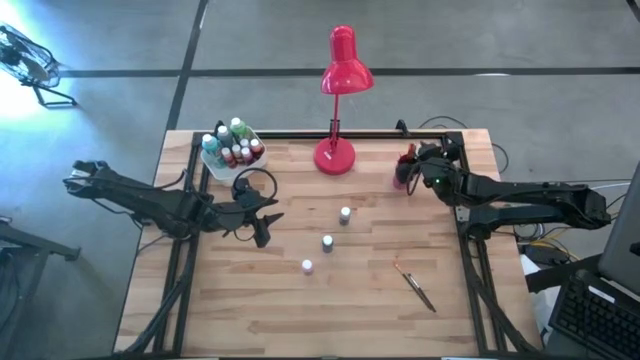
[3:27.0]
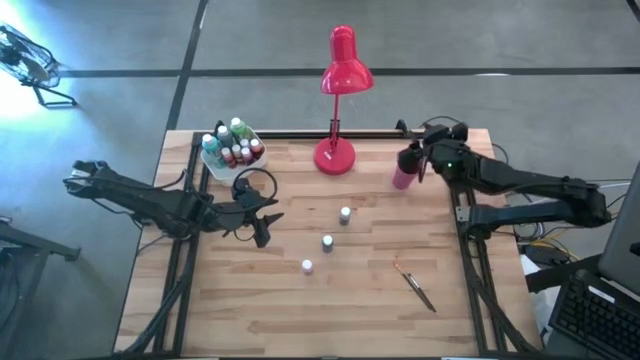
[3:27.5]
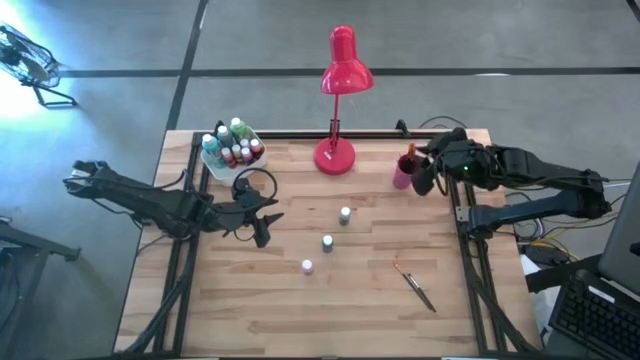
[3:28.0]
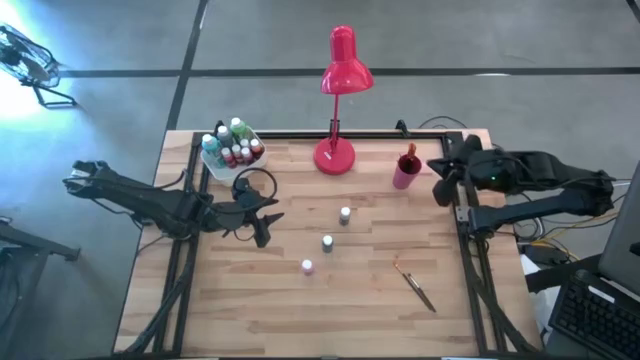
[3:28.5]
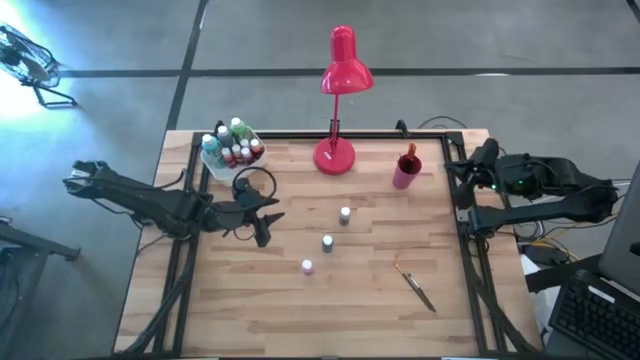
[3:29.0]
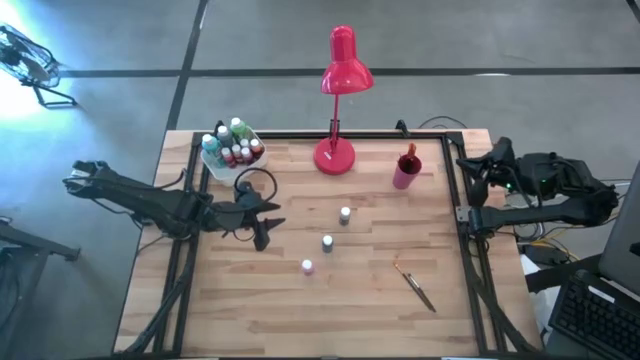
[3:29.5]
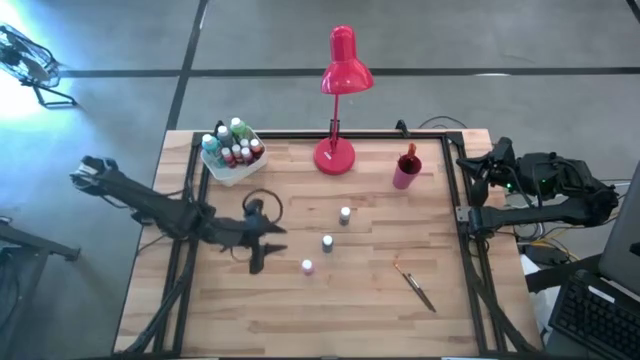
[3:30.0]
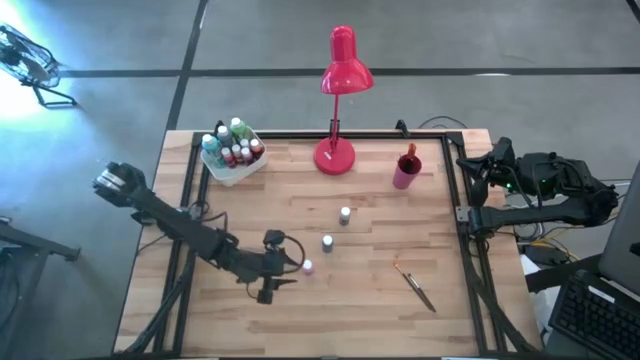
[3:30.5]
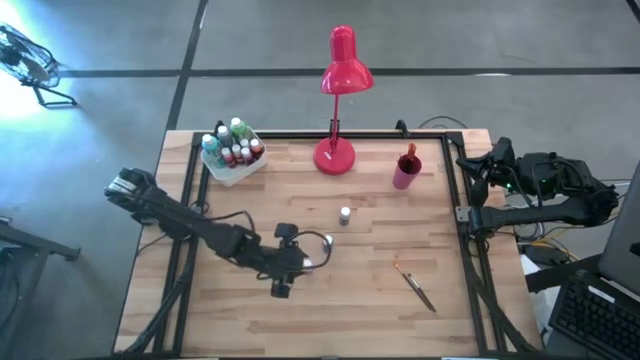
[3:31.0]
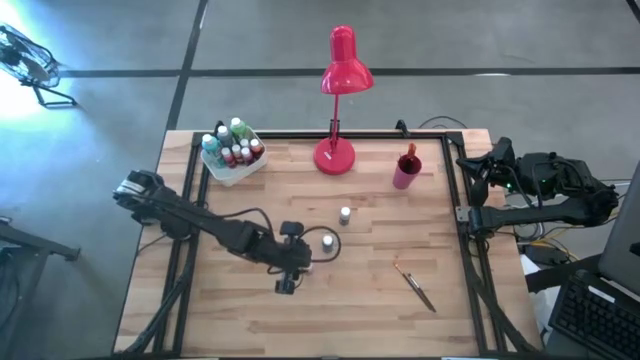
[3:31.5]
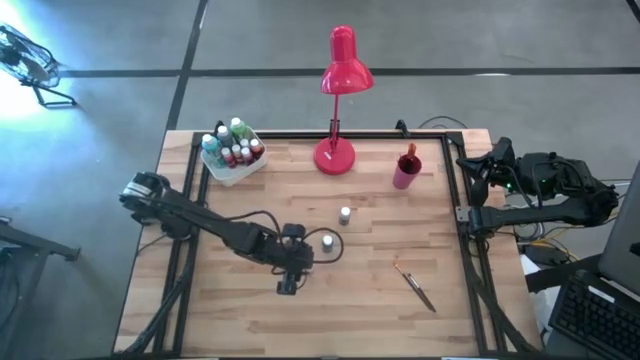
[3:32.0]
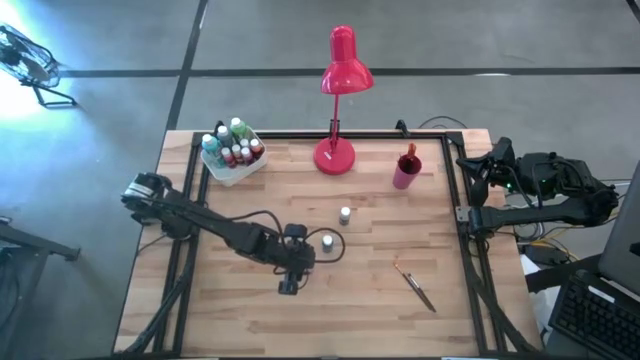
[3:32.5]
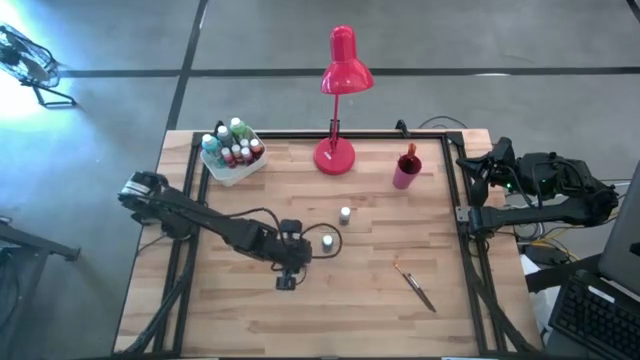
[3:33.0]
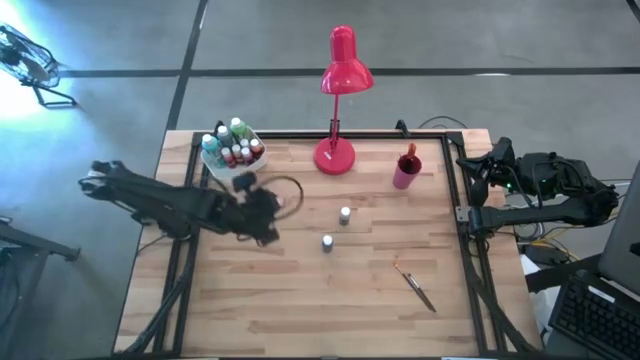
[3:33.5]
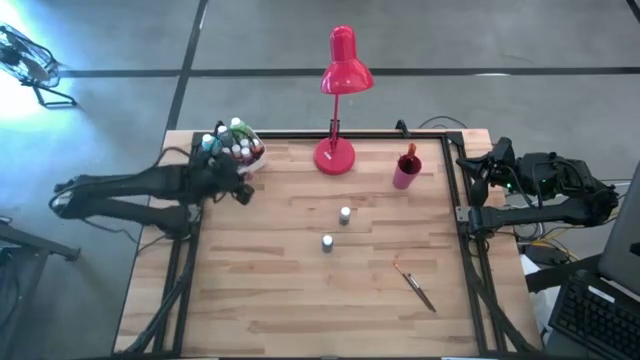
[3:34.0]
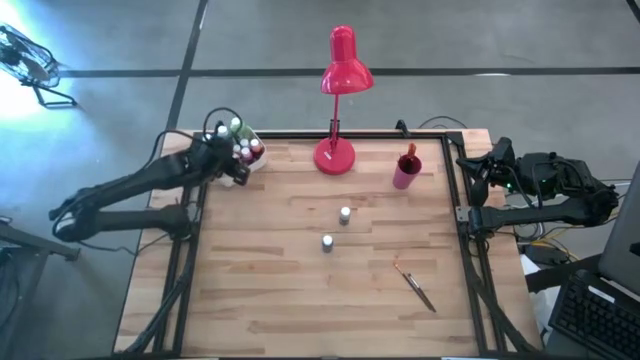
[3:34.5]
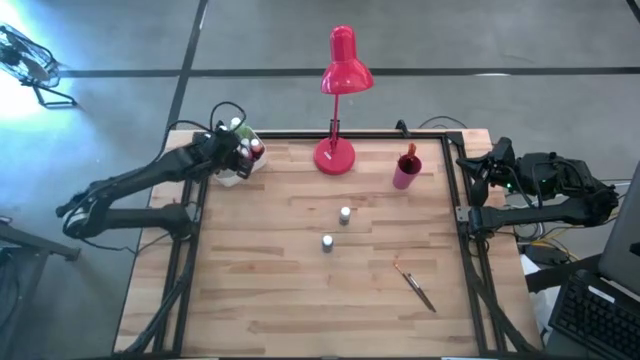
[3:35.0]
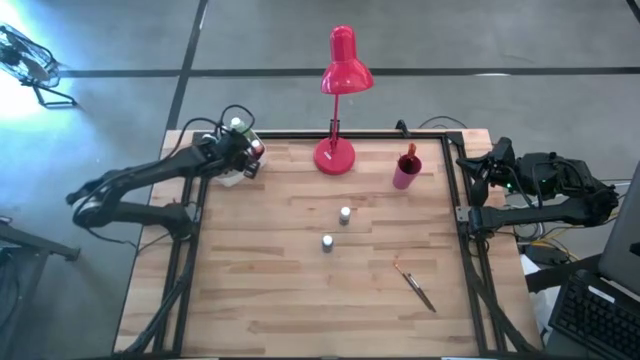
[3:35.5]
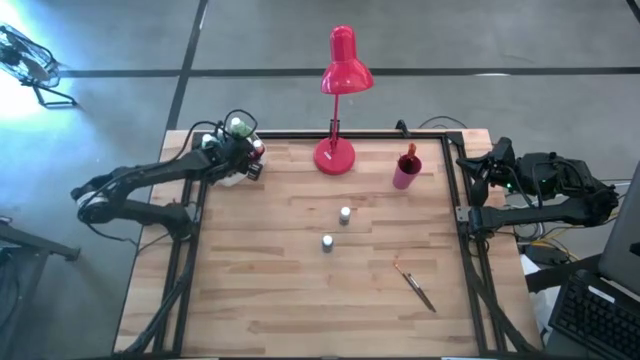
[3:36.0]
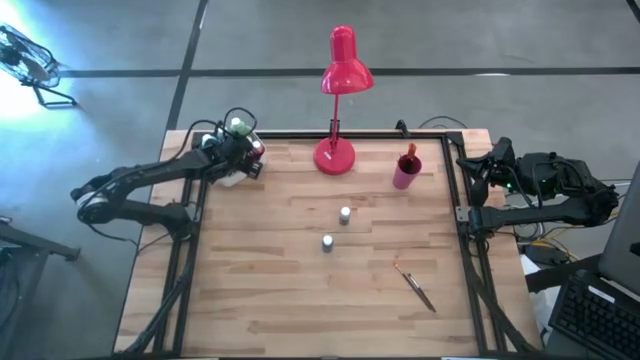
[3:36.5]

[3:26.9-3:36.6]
Task: Pick & Place Paint Supplies
Put the light pink paint bottle into the white bin

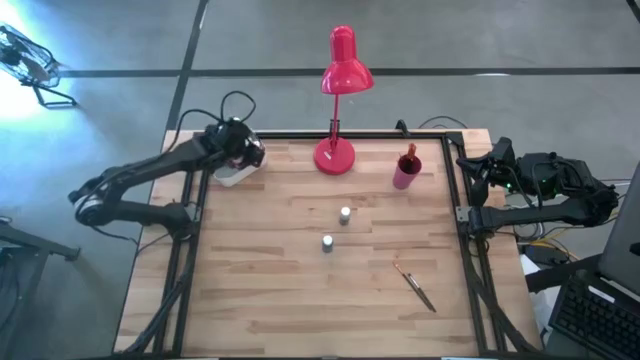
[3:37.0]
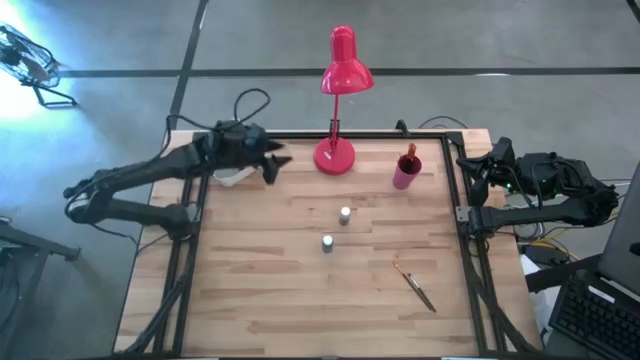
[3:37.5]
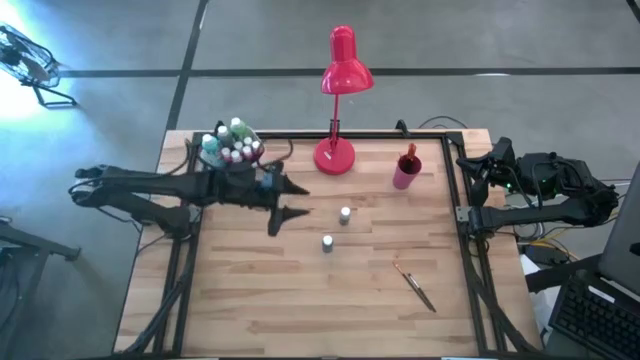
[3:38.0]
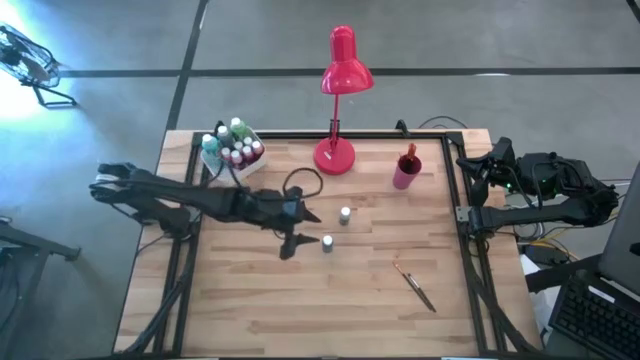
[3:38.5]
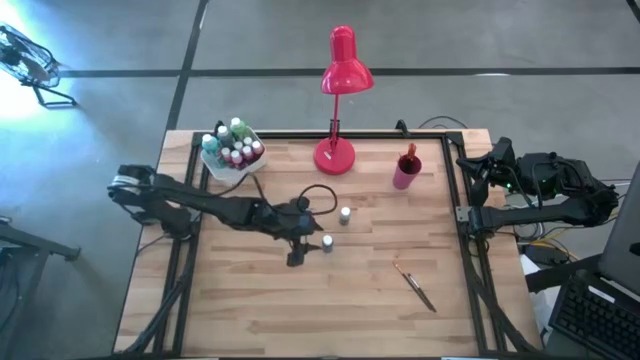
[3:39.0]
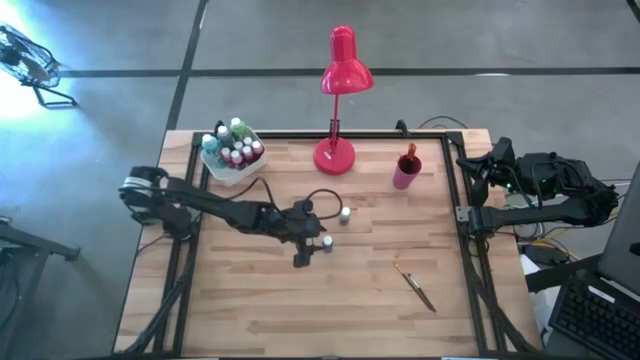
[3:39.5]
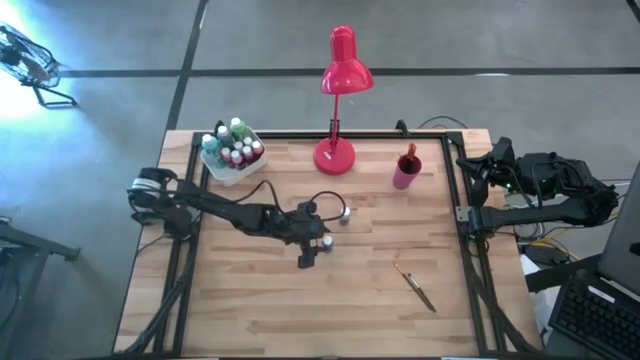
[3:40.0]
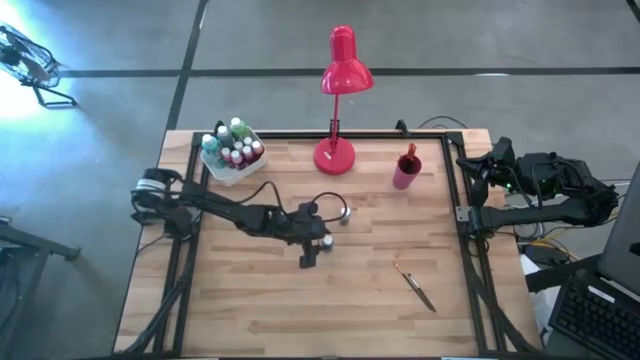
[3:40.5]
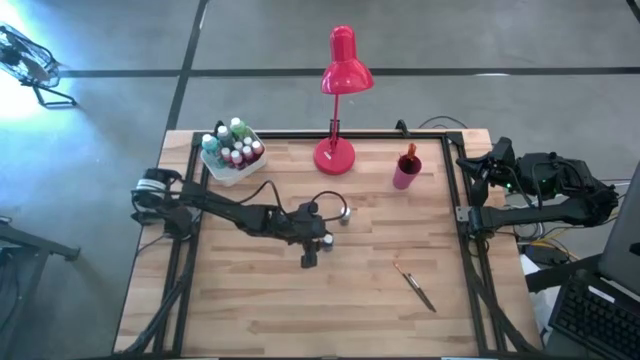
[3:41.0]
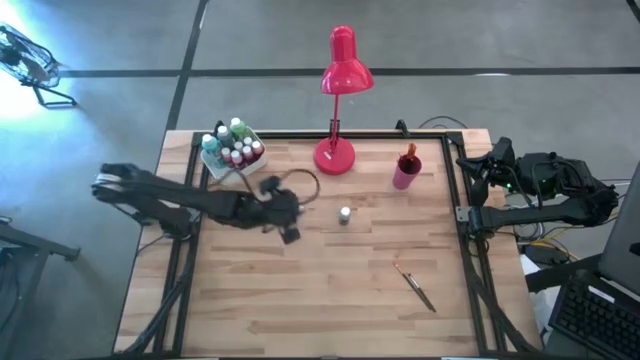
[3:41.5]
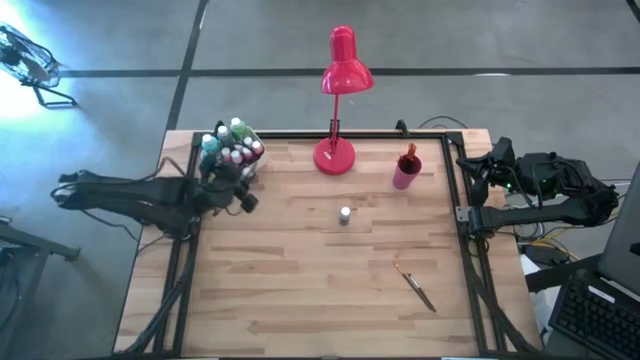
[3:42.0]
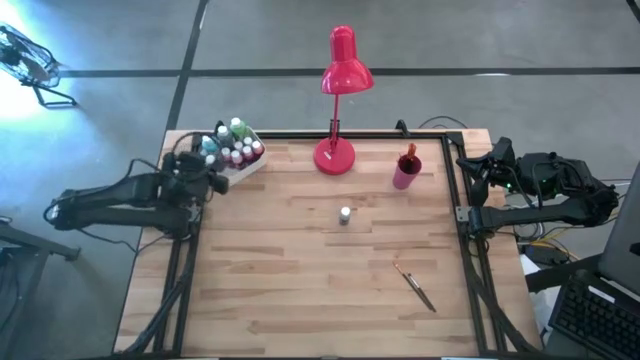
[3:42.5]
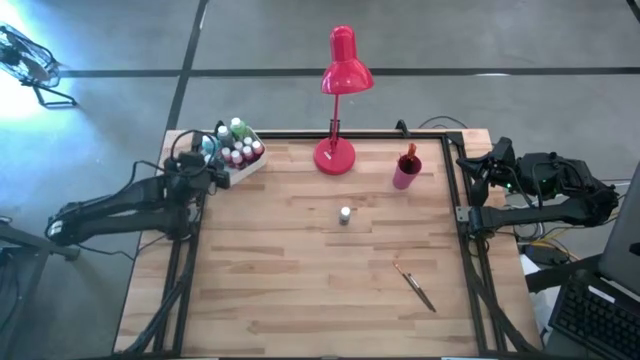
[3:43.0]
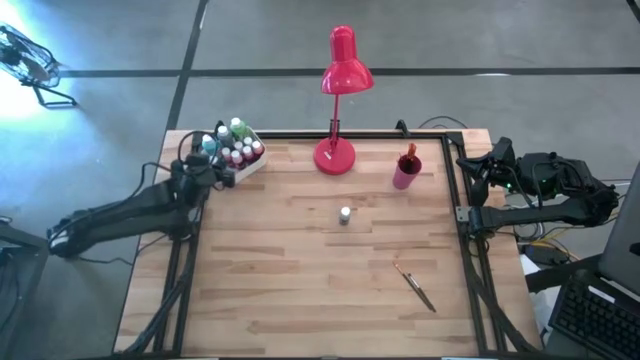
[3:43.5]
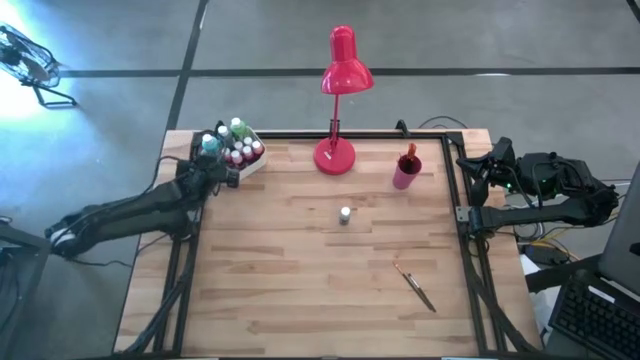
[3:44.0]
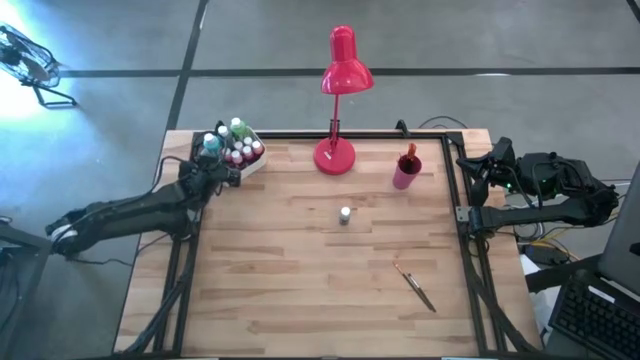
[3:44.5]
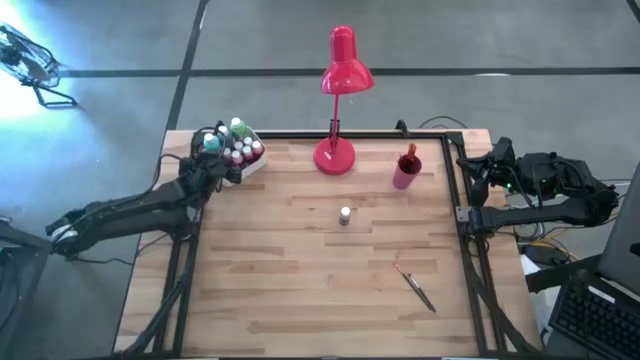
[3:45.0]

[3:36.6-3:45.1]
Put the blue paint bottle into the white bin
